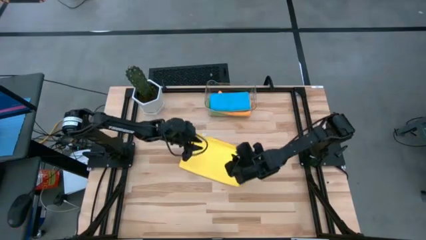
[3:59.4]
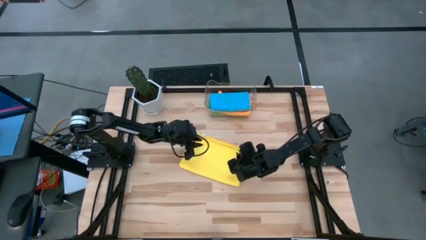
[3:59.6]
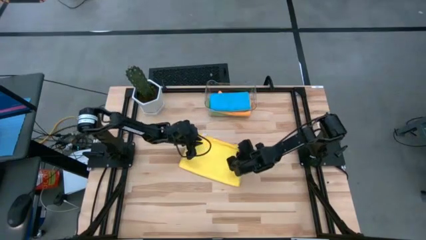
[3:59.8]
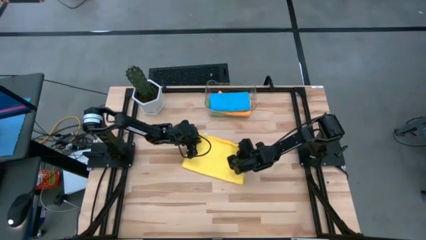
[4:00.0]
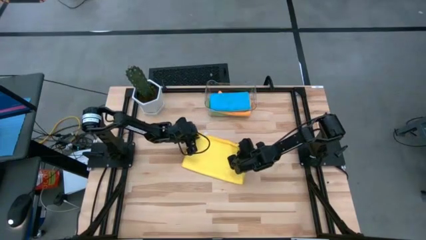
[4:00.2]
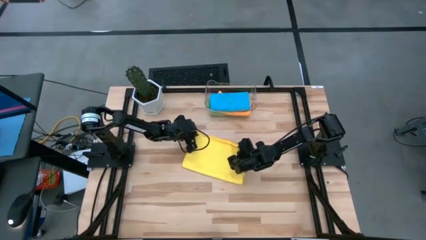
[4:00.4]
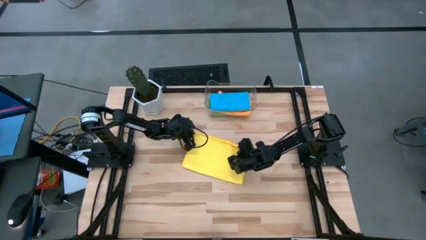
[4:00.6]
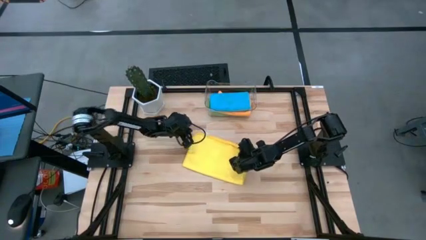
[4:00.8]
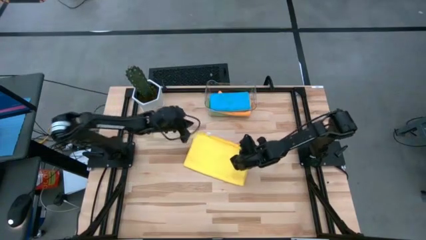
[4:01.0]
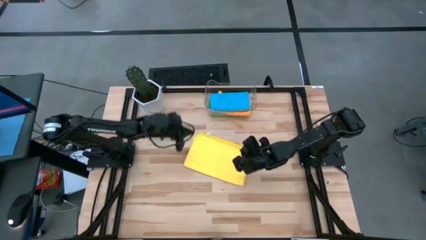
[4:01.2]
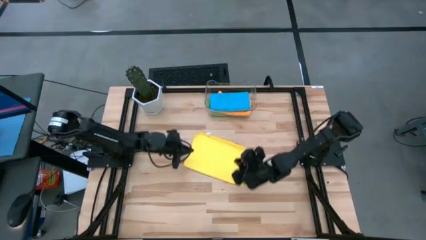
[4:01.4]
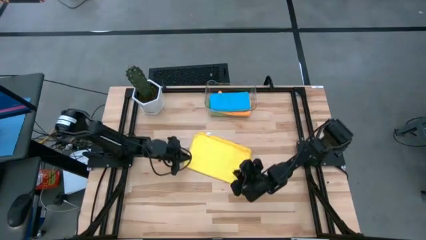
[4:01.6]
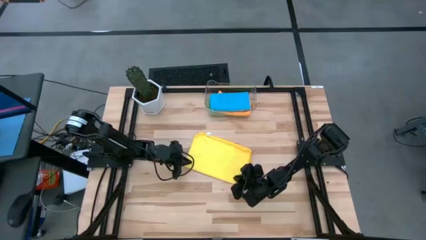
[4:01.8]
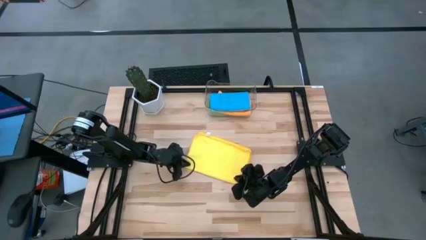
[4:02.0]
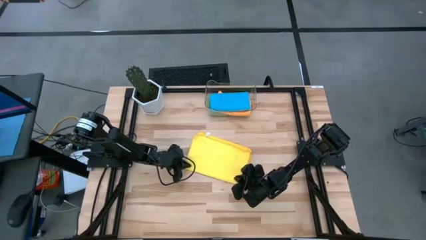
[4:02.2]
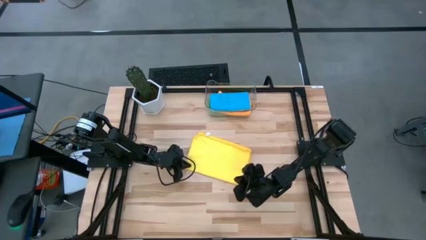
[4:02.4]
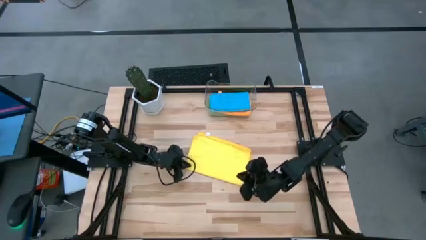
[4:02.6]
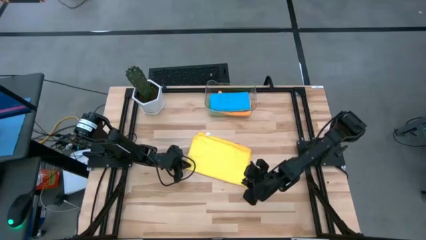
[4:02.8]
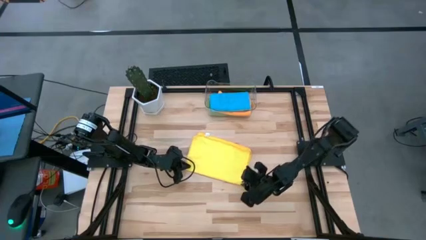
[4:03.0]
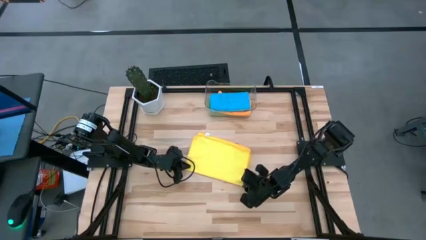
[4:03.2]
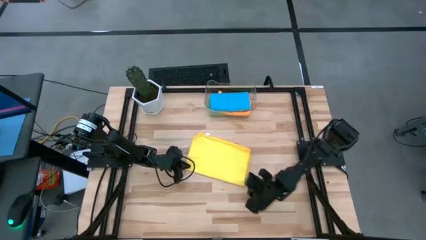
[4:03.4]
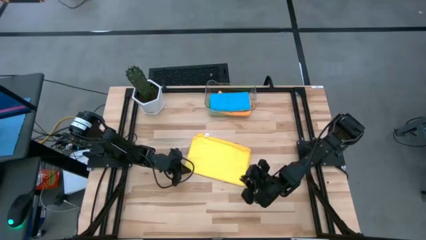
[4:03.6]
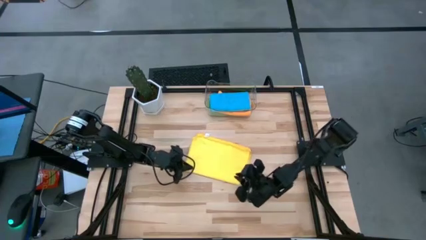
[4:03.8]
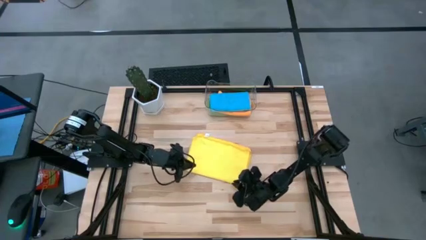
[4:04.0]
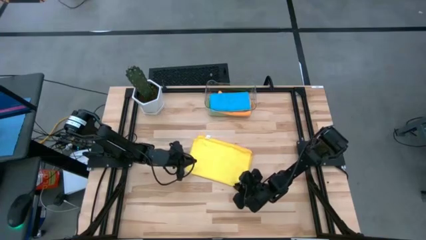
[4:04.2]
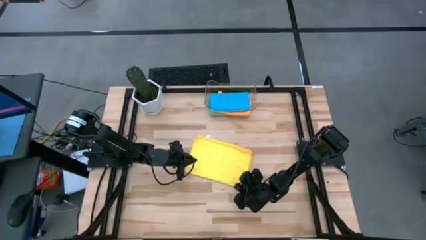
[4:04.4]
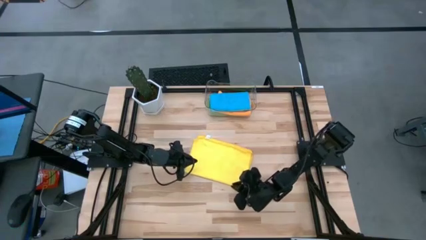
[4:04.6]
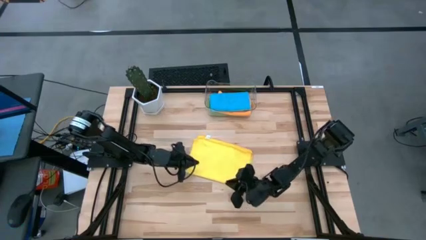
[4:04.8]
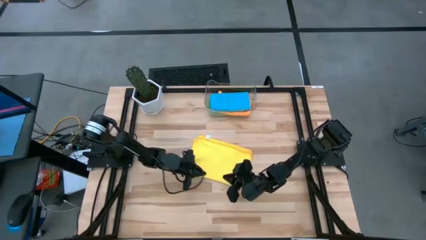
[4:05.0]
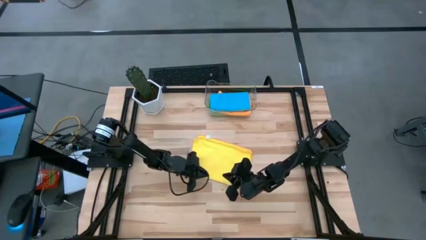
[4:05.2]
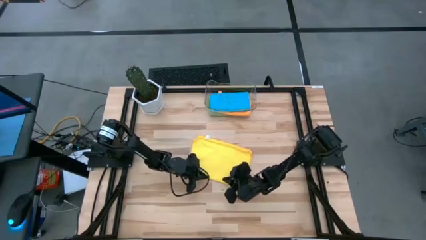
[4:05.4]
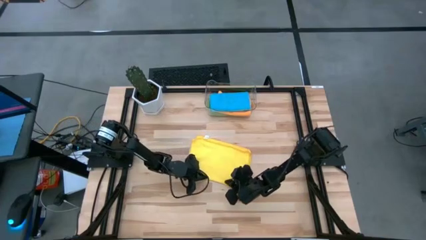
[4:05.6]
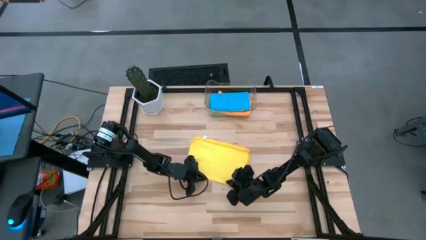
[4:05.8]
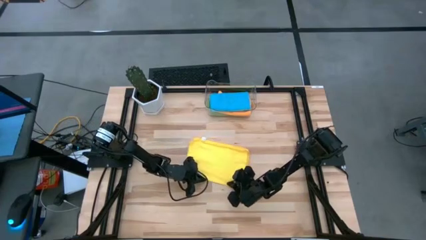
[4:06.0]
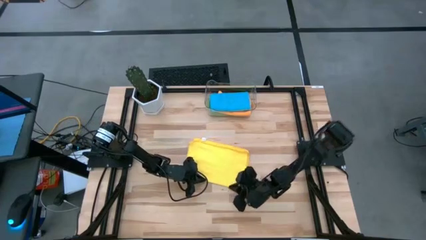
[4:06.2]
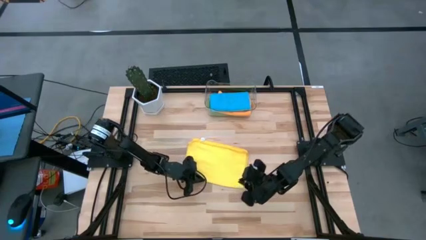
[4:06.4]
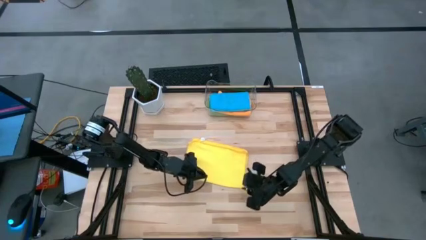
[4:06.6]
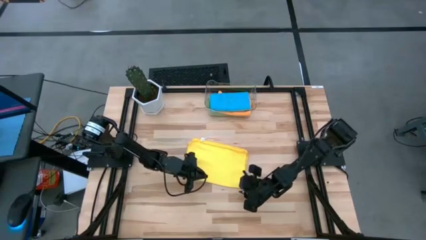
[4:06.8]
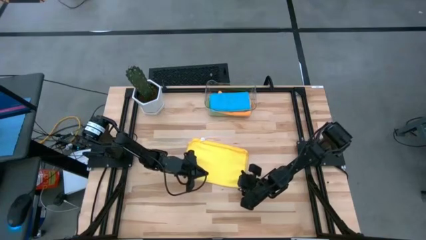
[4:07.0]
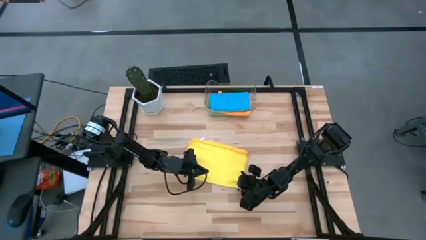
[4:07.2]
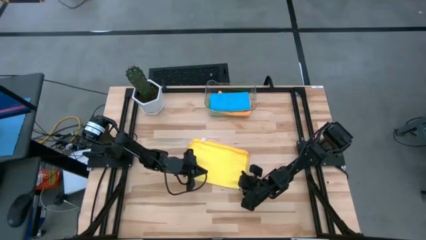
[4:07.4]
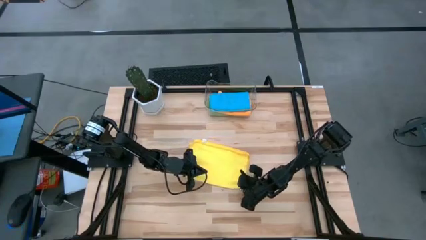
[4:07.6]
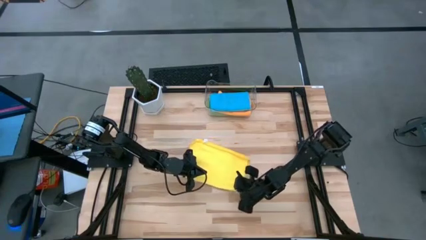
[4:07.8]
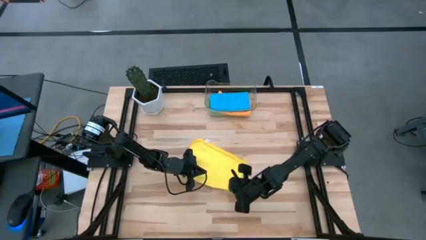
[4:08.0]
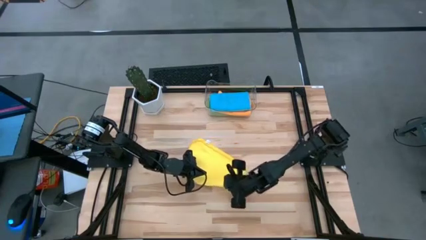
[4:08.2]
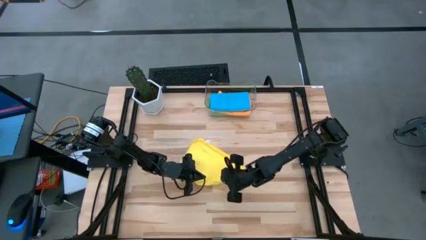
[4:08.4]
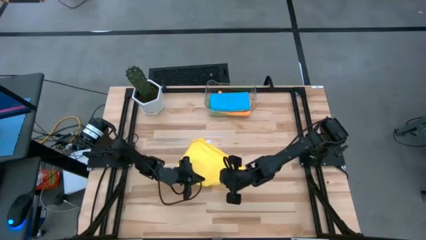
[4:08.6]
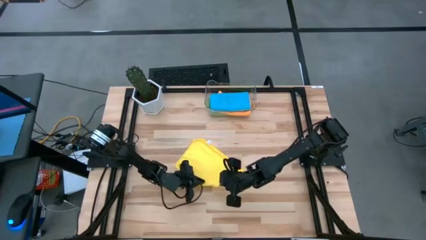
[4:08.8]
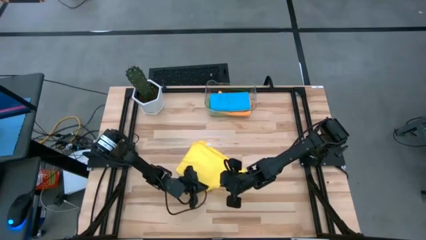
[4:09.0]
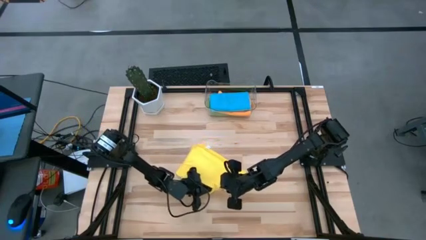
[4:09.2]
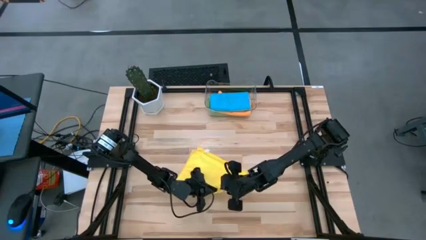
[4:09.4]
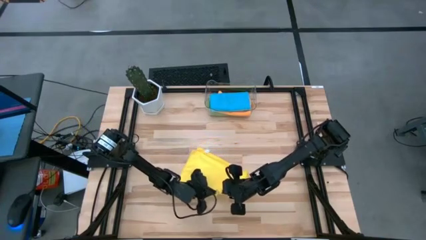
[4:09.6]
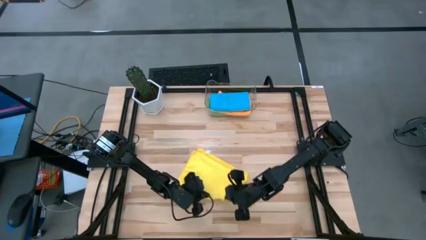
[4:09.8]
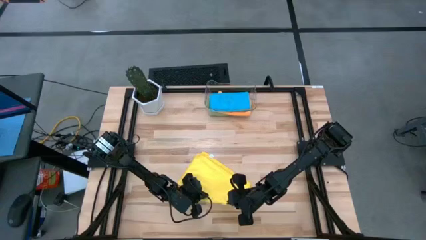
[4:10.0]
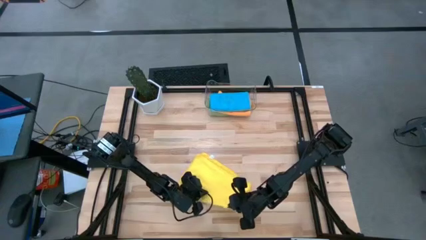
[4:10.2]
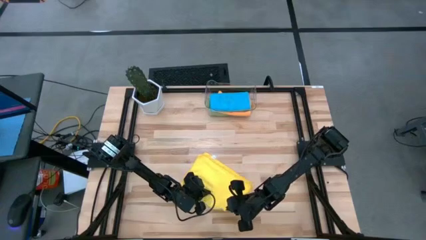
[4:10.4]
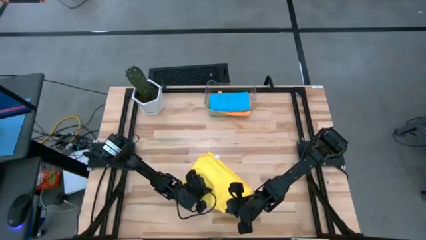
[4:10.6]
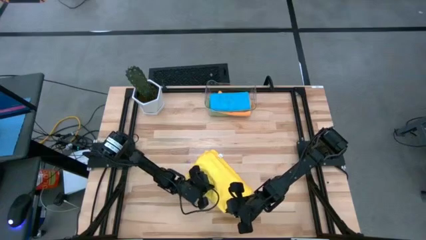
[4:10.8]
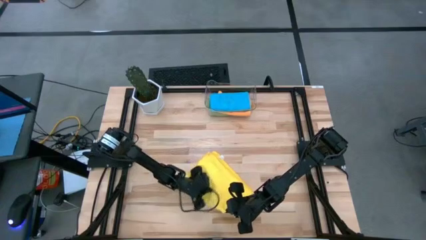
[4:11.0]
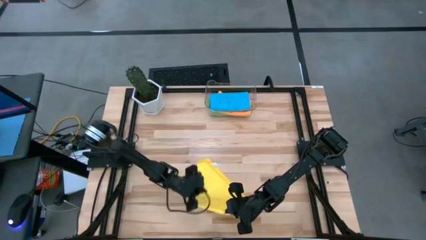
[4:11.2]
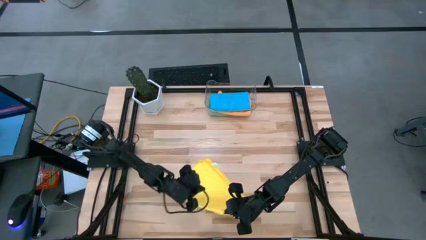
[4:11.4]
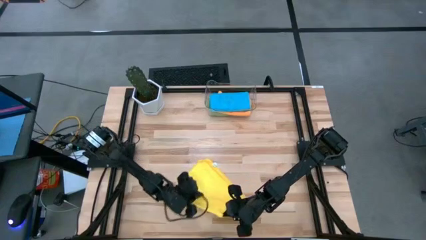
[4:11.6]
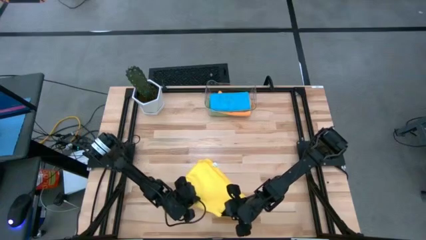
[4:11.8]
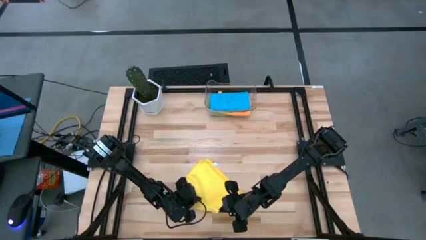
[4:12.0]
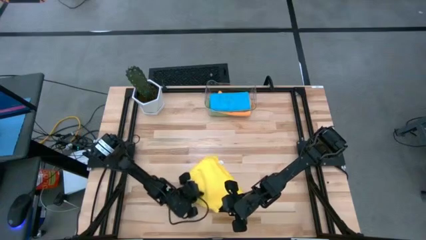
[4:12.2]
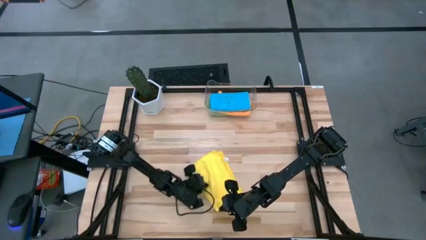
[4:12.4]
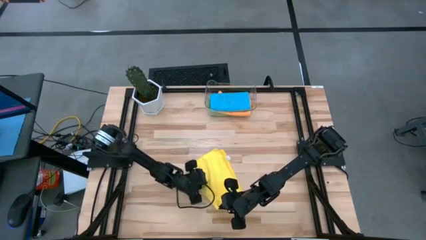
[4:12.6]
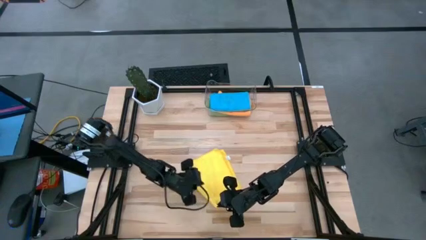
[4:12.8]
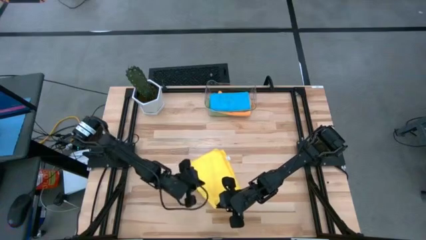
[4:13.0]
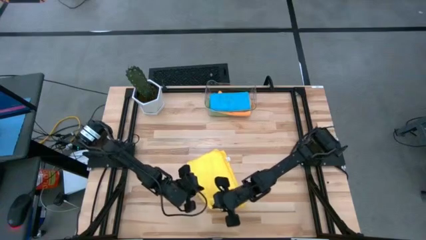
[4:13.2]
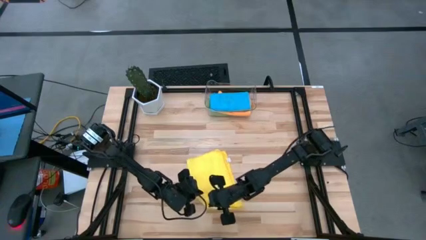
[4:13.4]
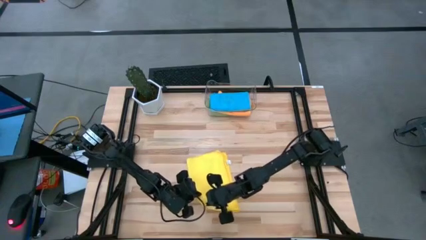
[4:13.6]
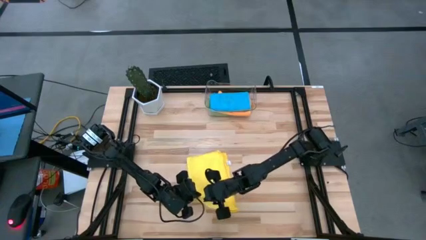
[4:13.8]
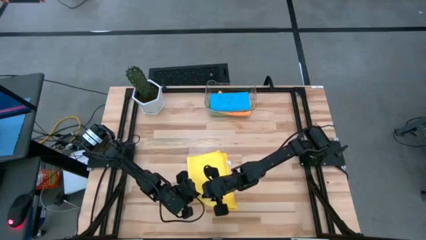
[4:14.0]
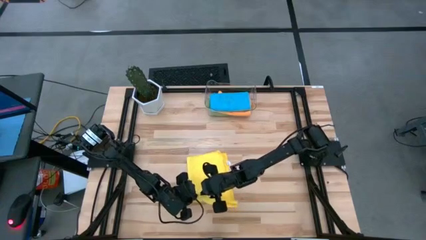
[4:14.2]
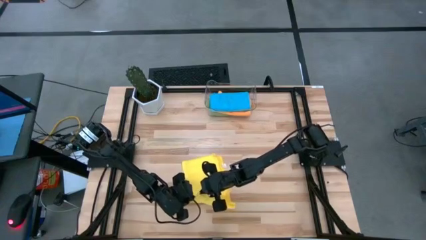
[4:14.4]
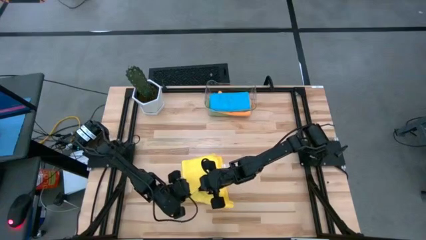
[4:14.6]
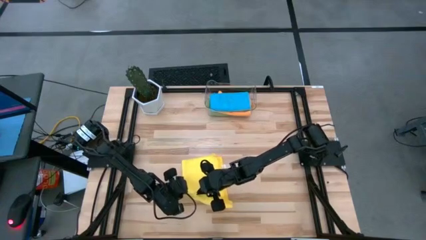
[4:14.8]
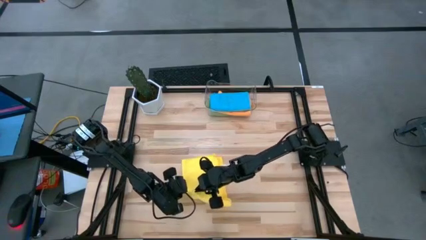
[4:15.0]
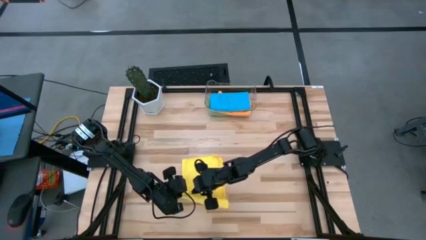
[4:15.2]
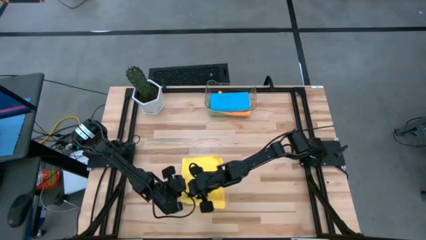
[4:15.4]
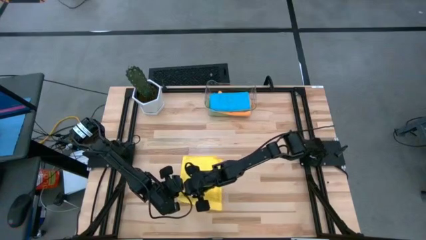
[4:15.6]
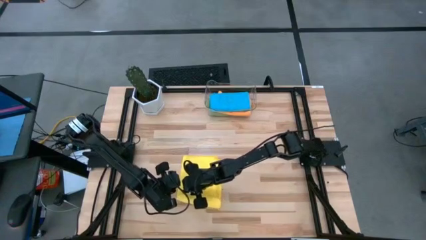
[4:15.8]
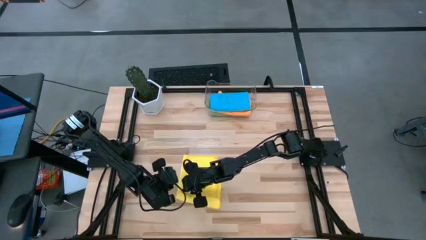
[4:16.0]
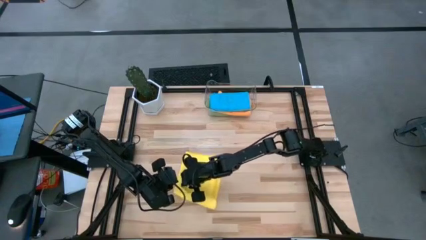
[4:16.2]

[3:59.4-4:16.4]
Task: Fold microfiber towels
Fold the yellow towel
